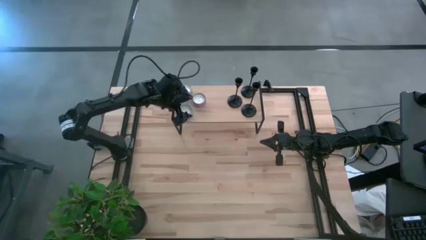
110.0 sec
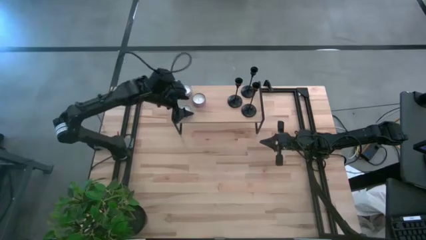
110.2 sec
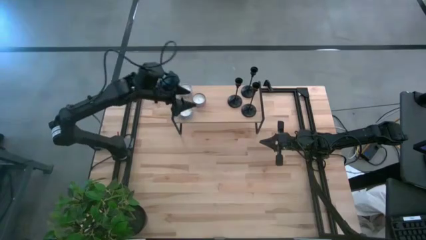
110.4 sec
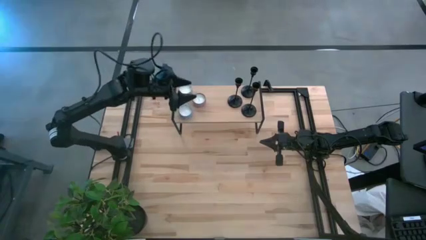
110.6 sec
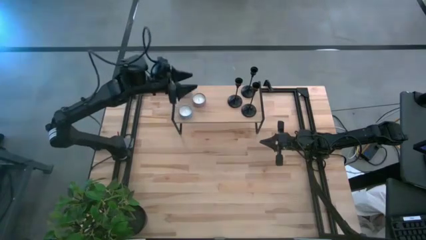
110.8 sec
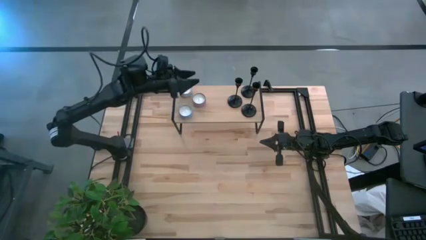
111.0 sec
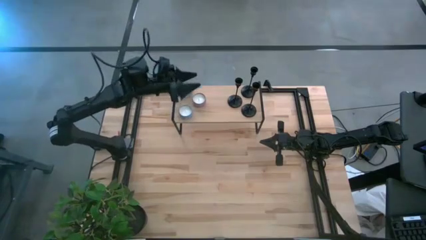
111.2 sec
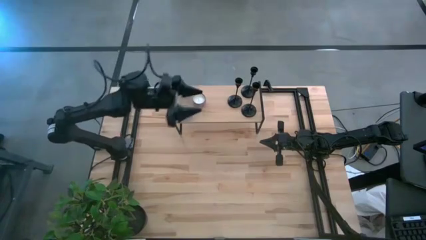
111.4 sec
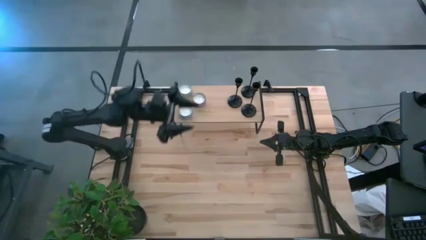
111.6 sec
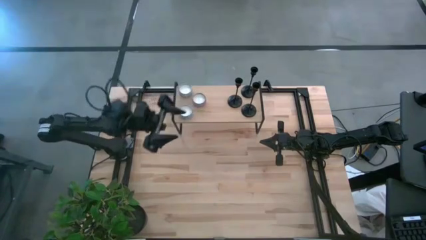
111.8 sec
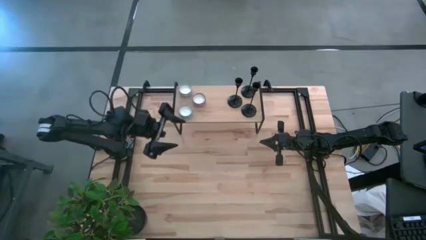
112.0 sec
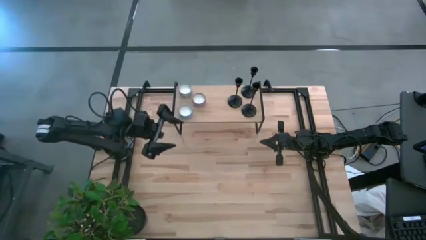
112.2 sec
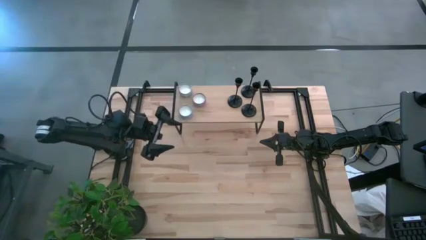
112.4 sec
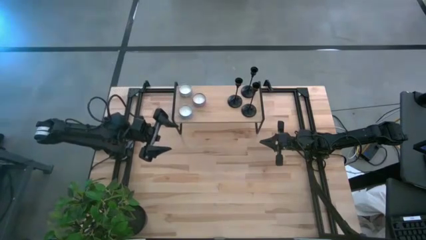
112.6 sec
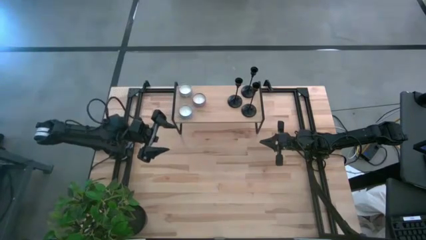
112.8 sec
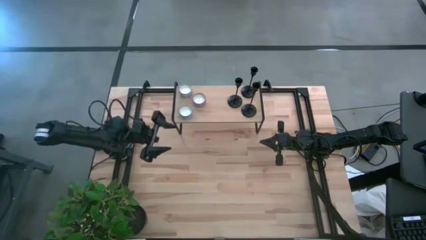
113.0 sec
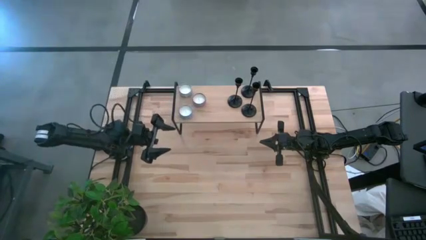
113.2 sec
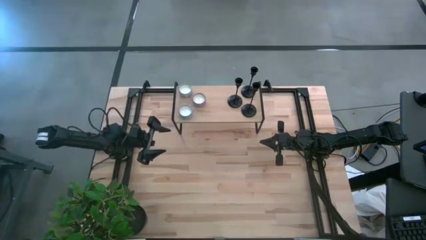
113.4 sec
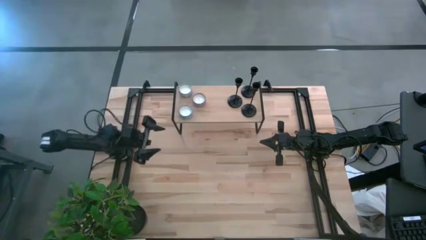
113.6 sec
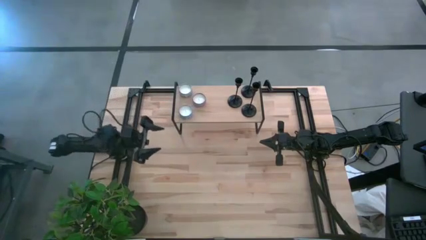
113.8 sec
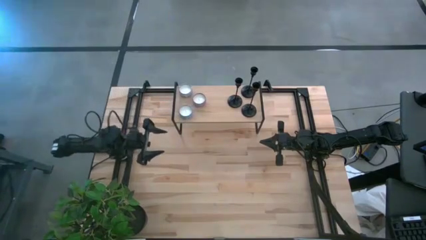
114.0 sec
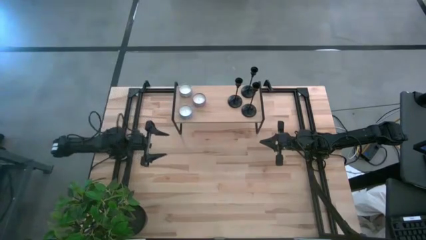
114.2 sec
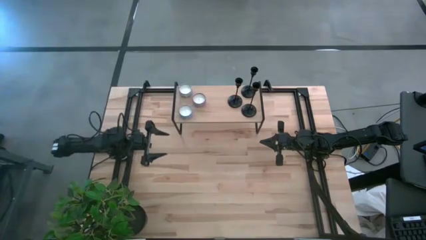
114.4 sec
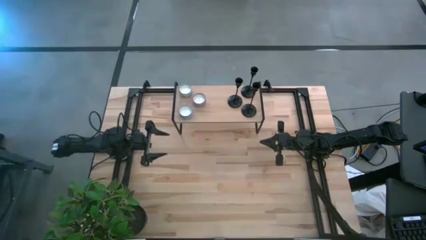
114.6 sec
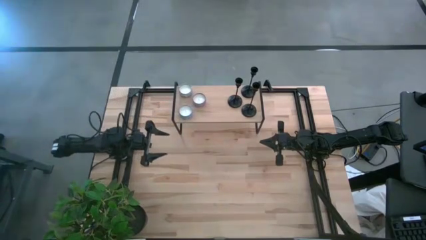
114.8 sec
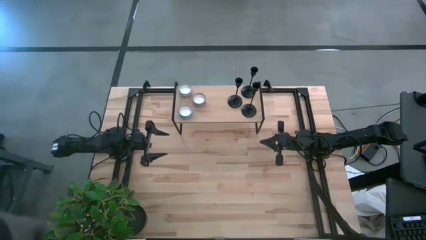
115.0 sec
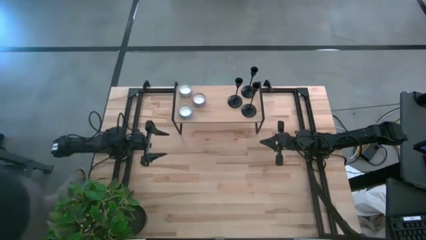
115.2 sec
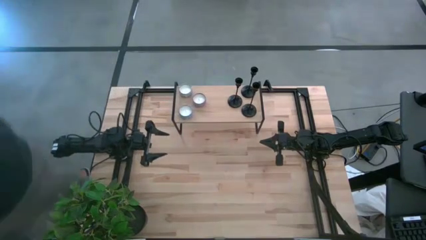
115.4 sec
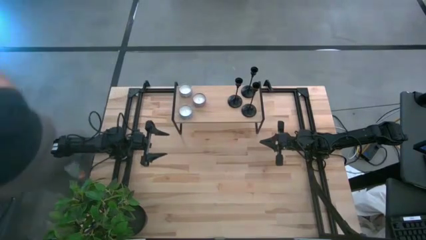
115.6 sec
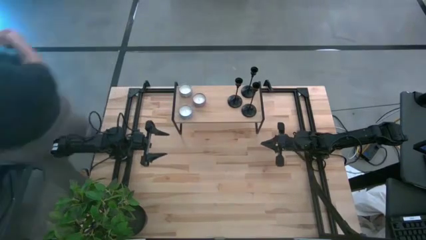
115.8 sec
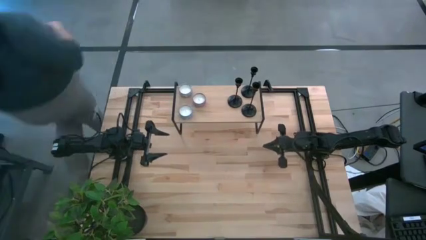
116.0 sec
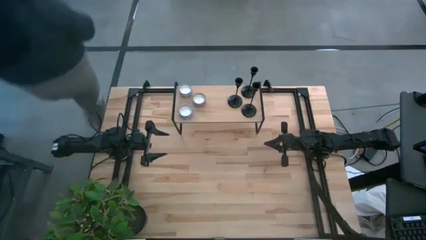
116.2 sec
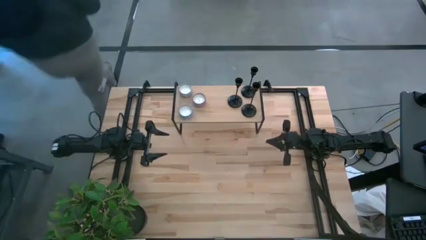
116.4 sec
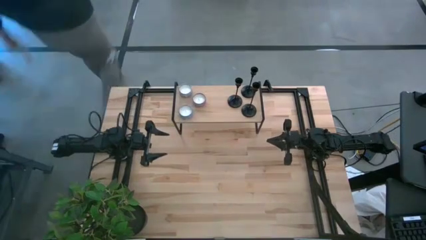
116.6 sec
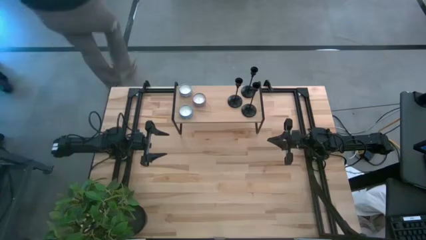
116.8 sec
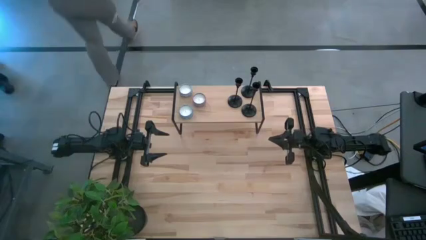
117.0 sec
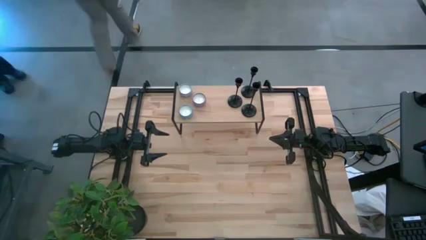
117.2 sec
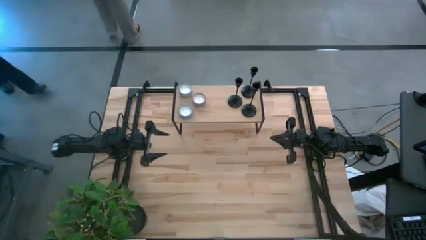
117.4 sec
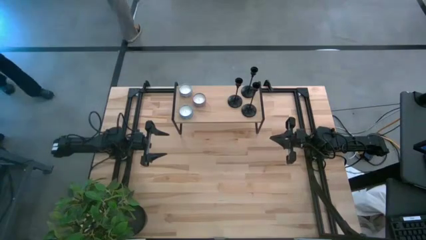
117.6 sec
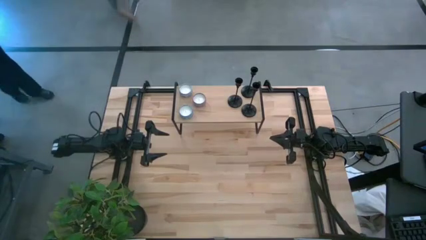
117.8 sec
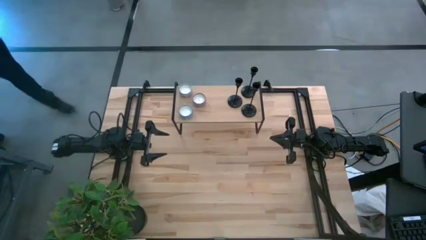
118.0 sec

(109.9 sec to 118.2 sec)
Task: Pick & Place candle stick holders
Return to Home Position

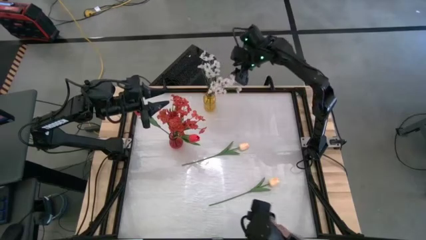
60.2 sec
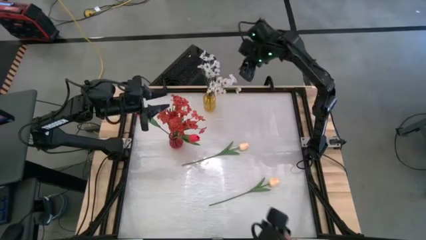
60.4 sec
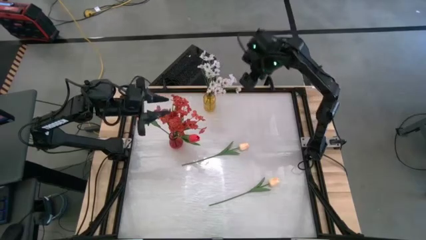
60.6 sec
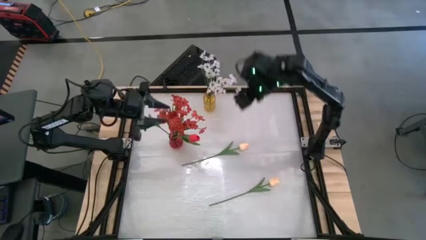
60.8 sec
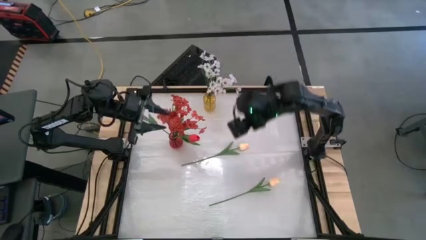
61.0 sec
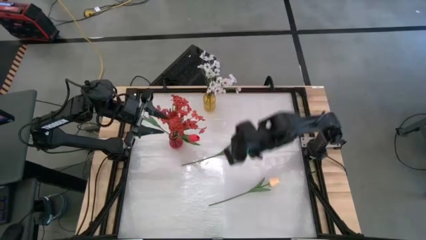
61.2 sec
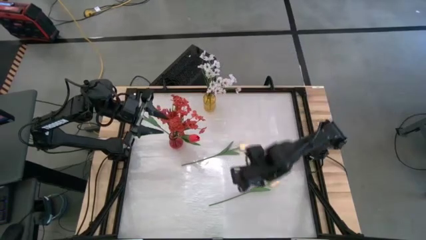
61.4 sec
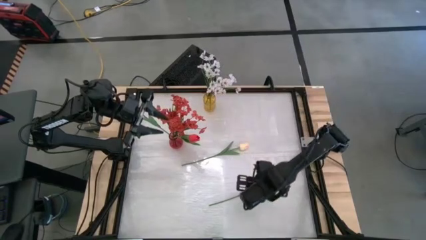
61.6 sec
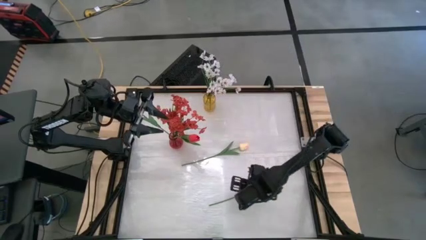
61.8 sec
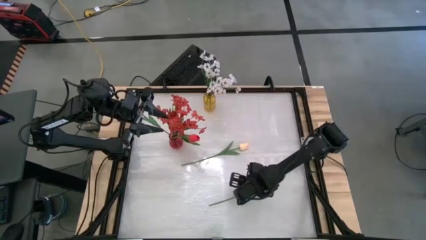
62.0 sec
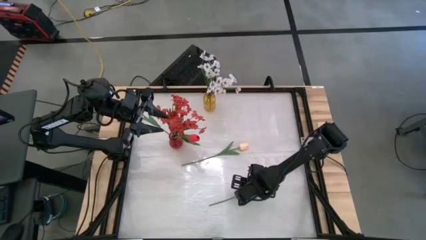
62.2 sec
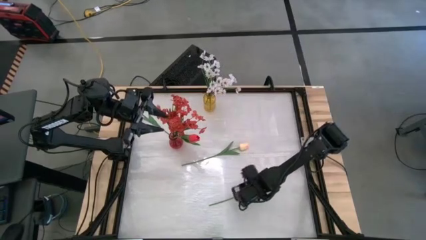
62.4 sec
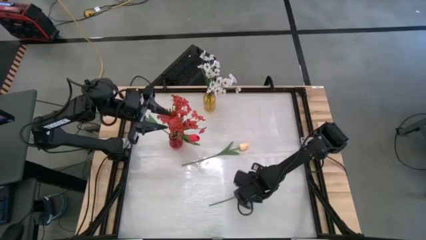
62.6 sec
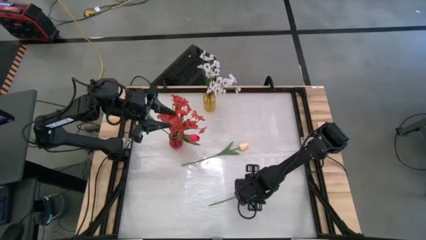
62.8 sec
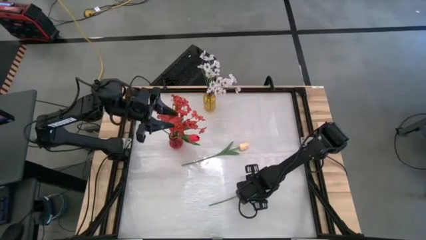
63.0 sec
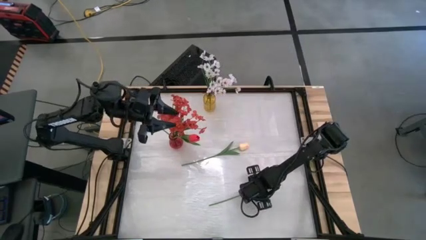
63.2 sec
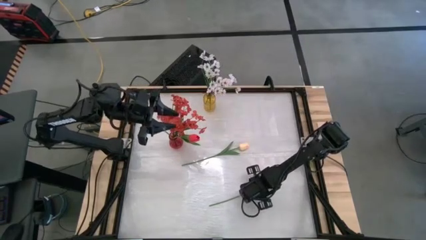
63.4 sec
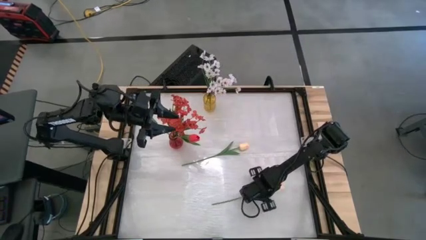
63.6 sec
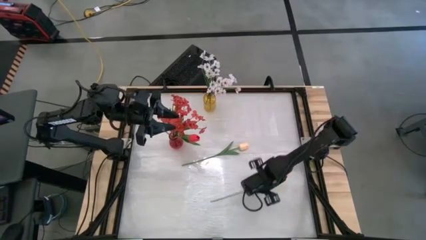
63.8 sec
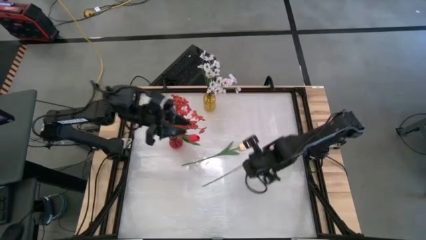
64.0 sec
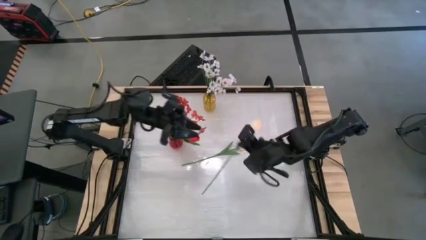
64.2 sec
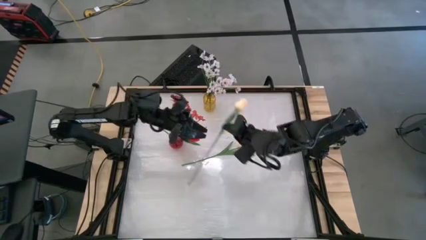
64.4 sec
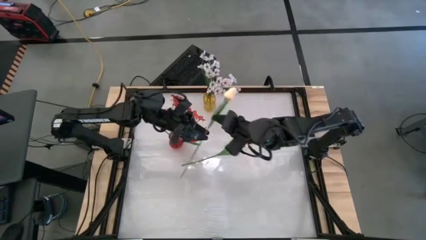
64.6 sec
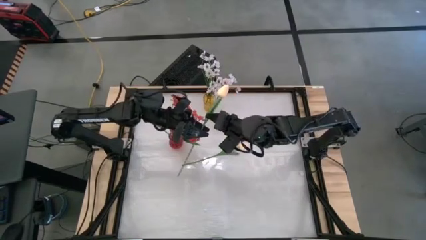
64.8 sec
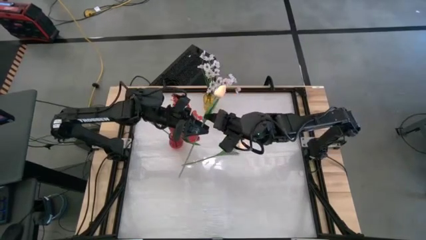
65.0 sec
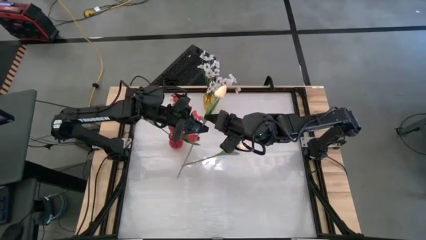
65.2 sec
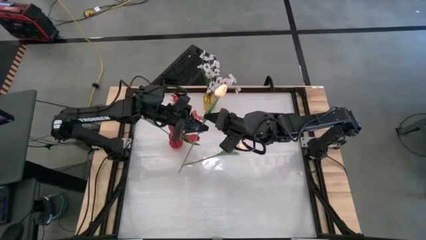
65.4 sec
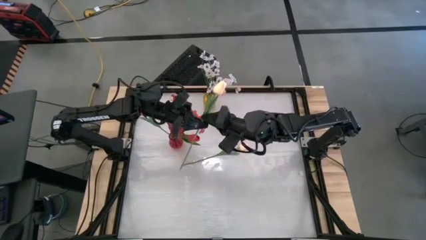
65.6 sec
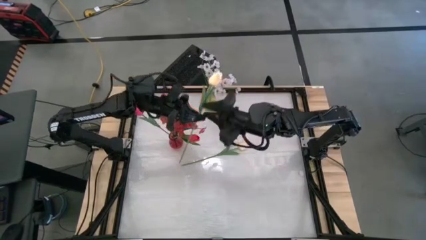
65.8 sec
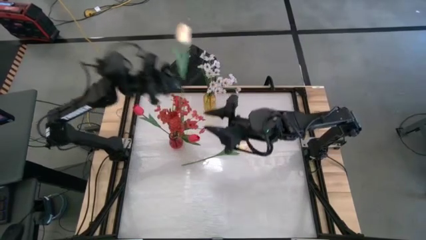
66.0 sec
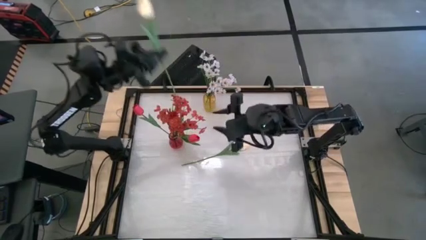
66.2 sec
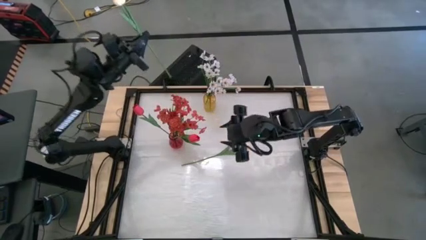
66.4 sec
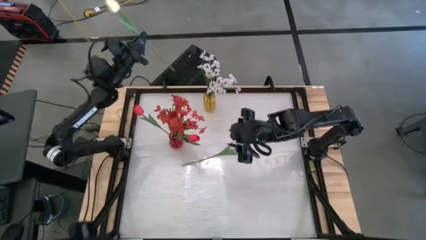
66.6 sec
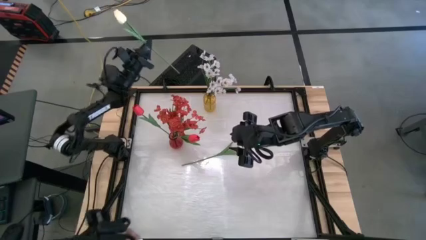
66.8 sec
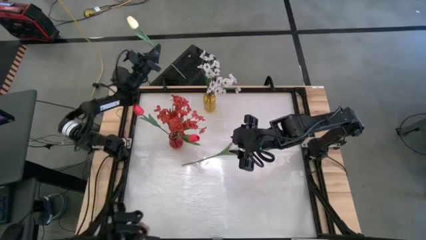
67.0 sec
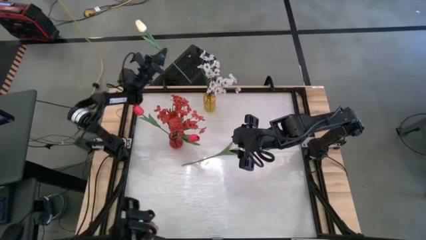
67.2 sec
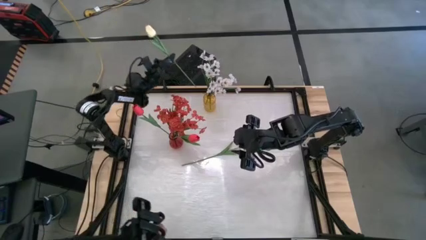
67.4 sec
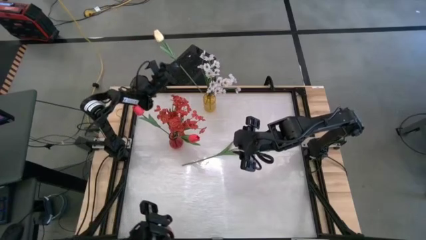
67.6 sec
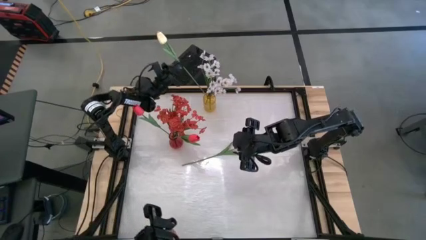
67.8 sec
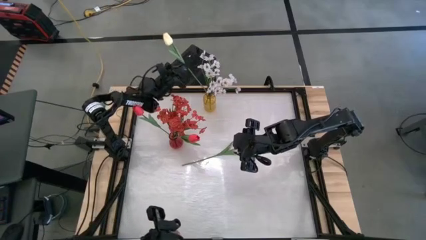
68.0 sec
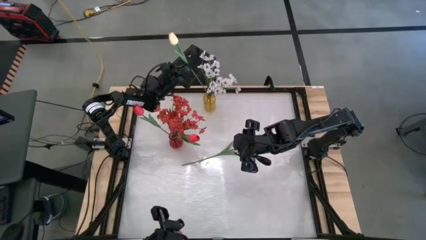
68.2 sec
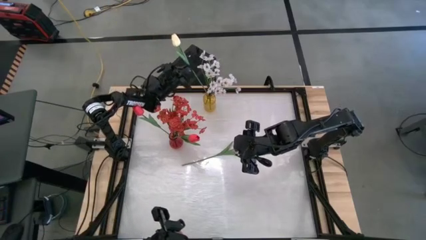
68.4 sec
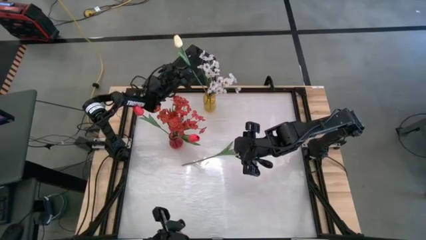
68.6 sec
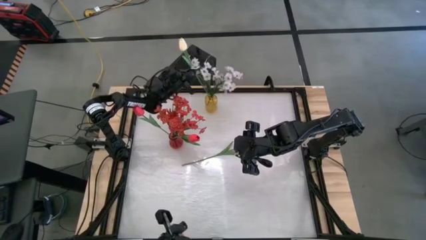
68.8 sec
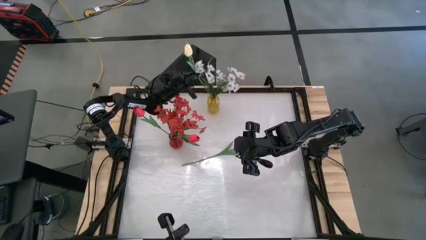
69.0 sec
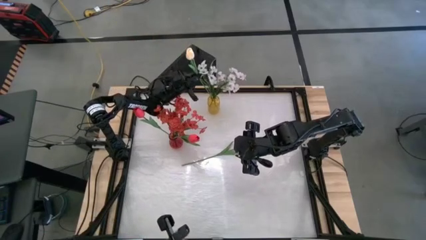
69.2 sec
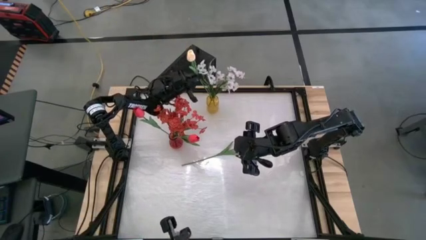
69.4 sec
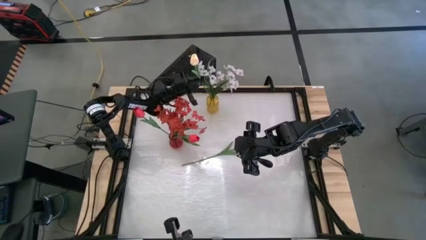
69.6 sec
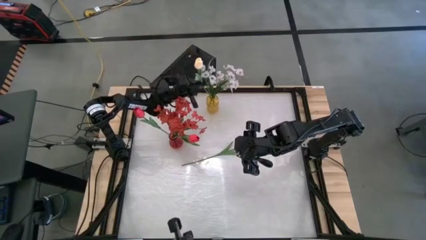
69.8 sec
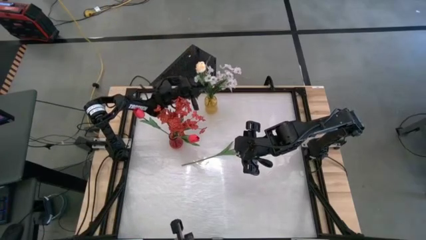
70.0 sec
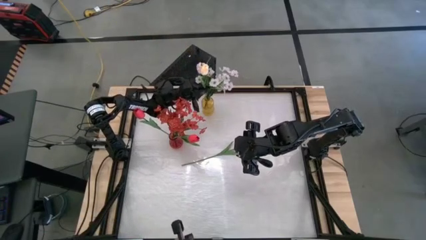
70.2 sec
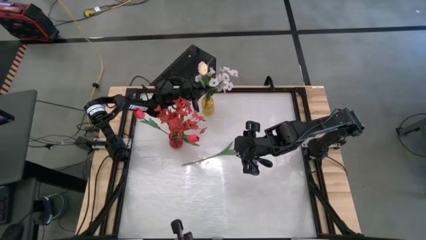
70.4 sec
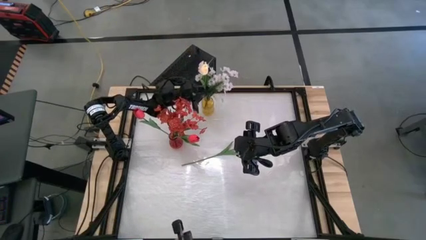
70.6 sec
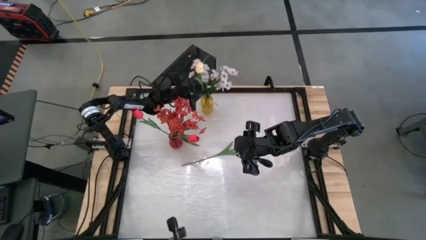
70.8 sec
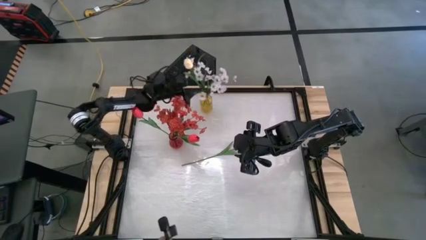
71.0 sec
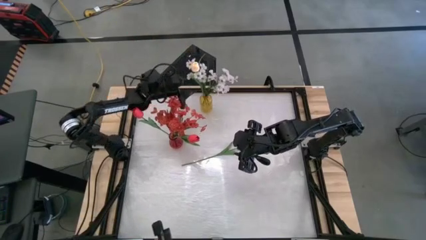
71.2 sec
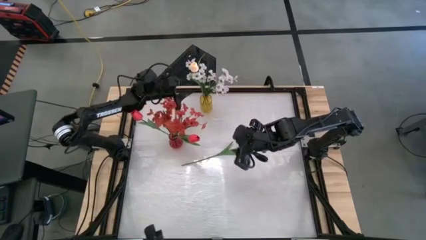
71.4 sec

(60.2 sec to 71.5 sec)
Task: Sort flowers into vase by color
Put the bottom red tulip into the yellow flower vase
